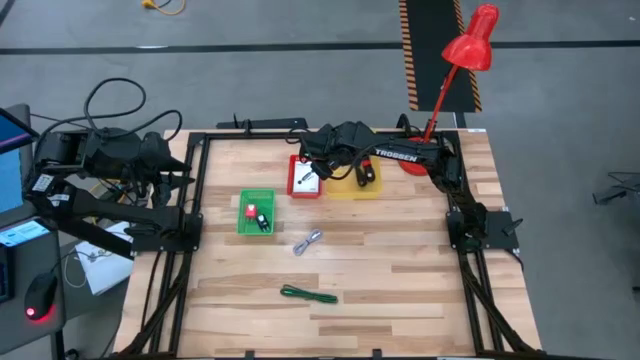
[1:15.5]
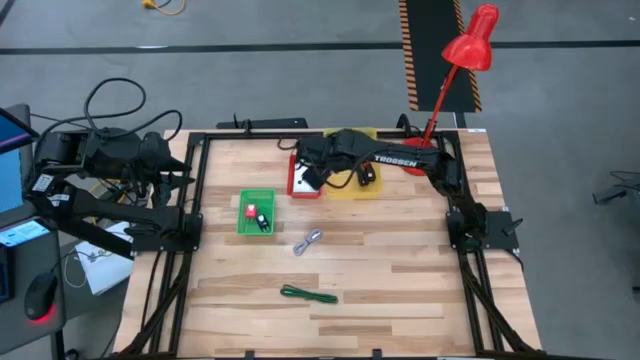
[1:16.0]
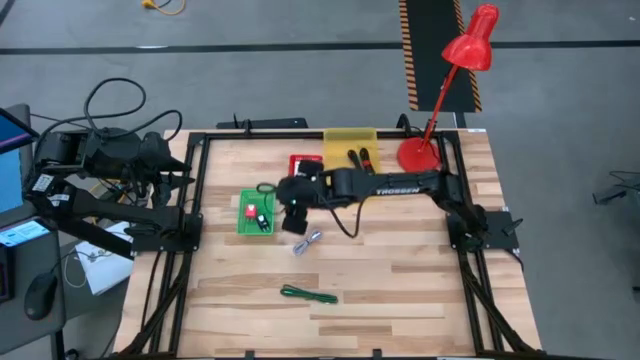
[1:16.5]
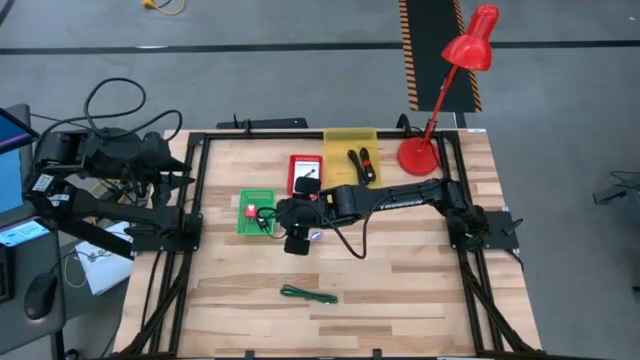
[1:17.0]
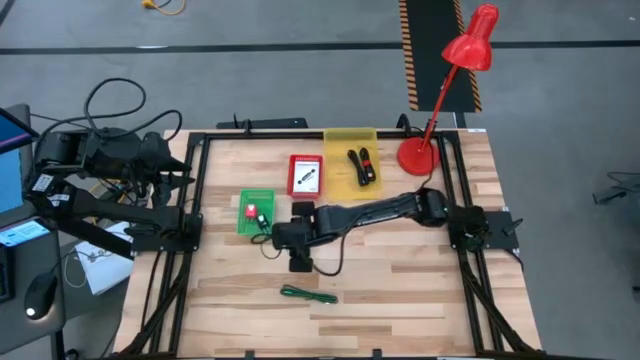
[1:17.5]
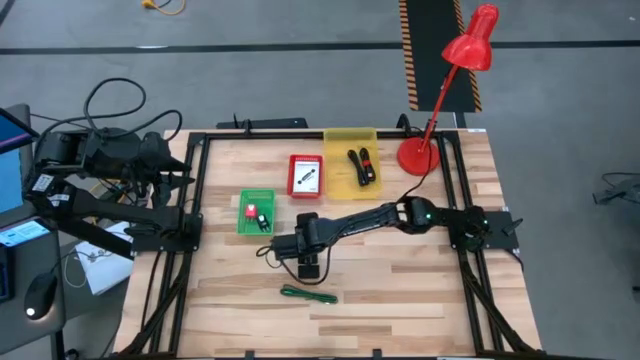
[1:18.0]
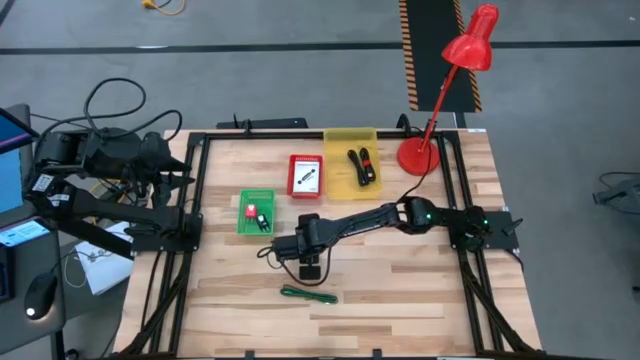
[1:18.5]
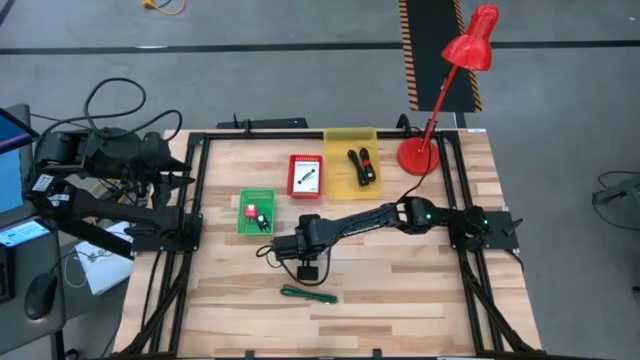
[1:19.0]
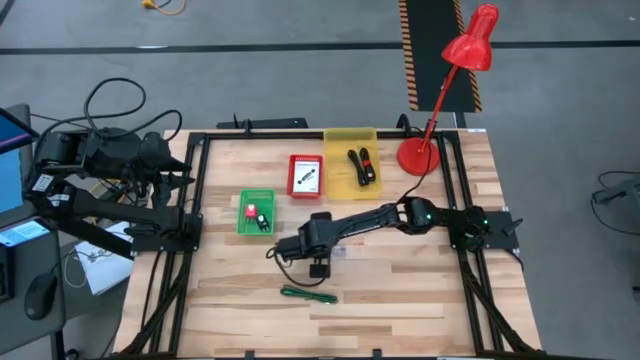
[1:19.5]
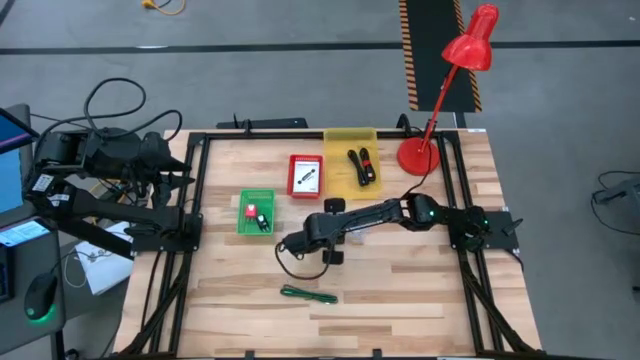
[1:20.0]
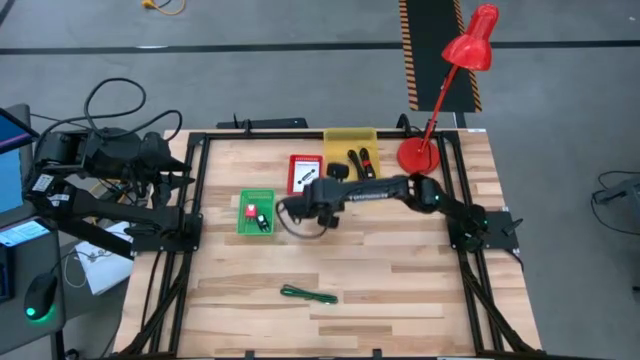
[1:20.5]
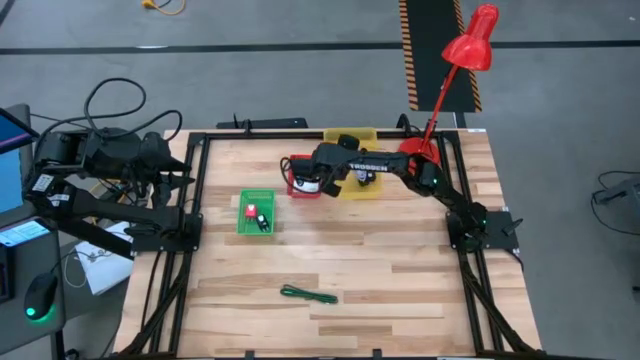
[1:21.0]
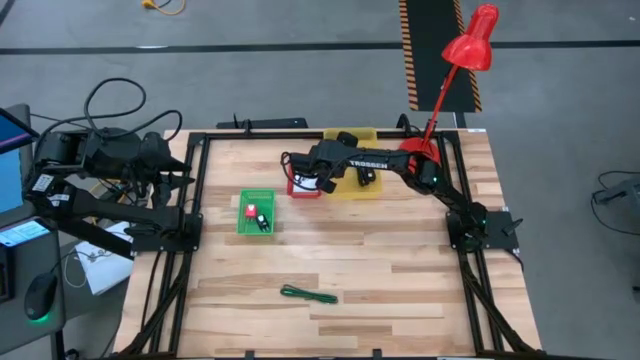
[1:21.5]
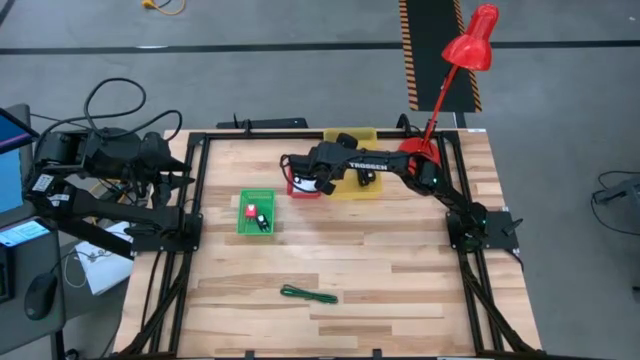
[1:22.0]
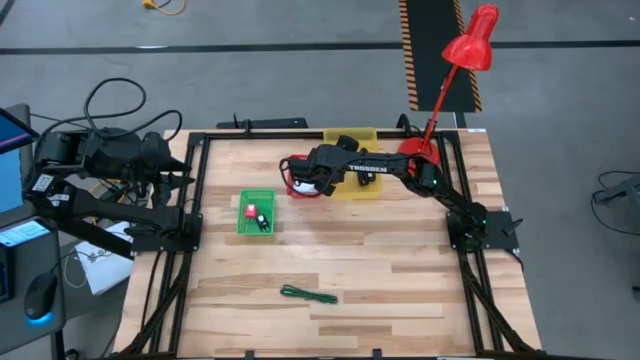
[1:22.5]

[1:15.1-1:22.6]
Task: Pick and place items into bin
Put the white charger cable into the yellow bin

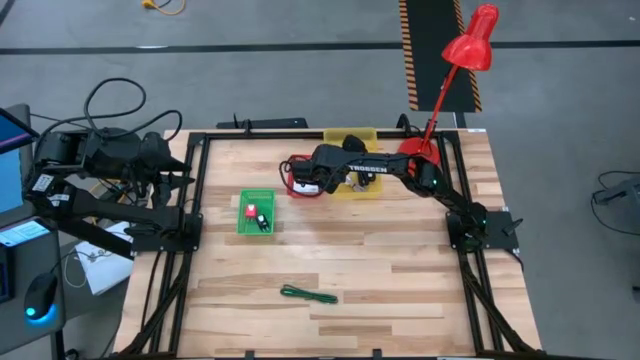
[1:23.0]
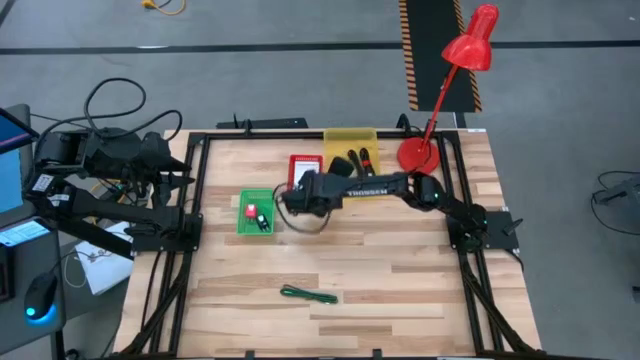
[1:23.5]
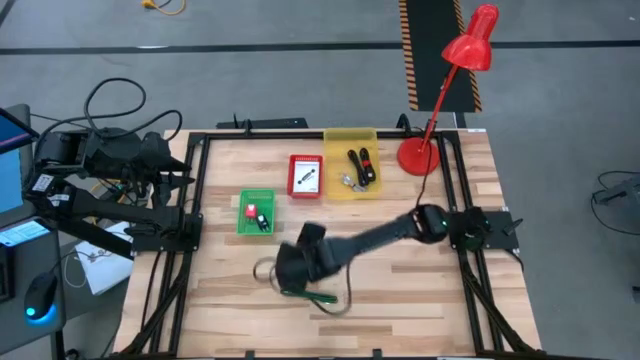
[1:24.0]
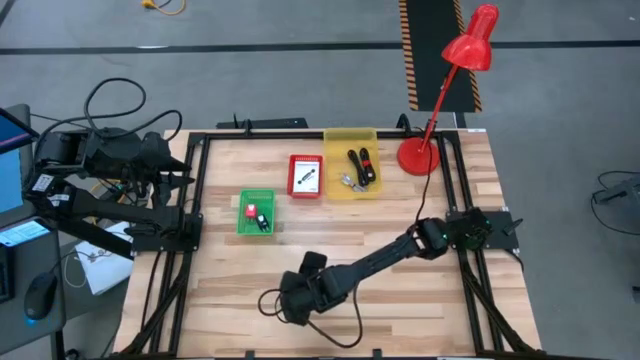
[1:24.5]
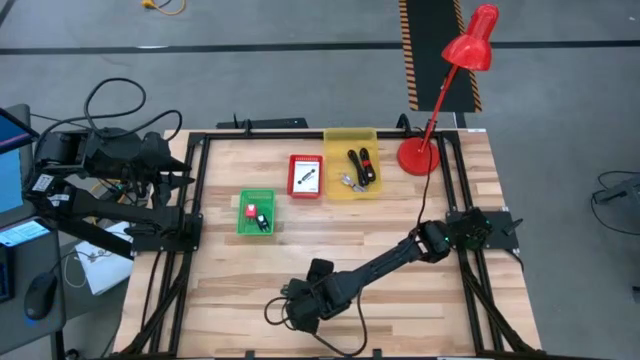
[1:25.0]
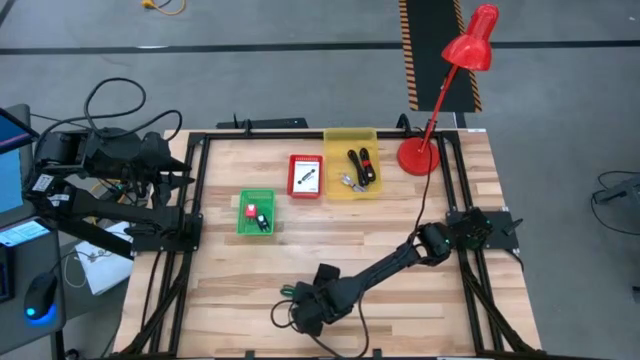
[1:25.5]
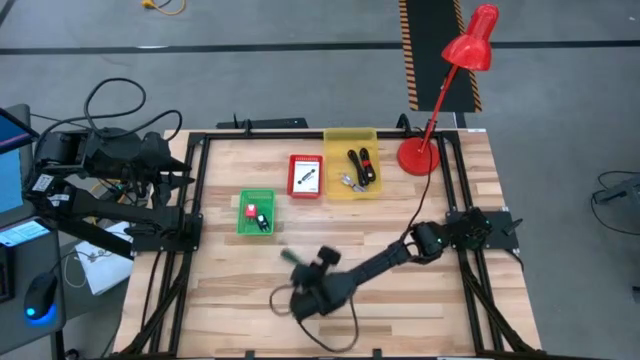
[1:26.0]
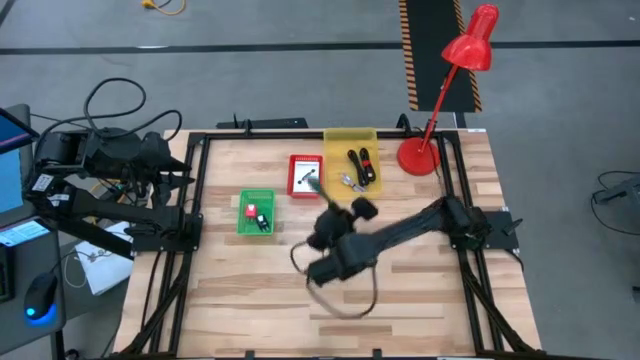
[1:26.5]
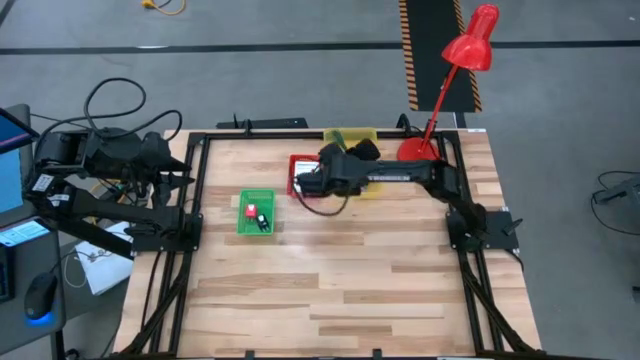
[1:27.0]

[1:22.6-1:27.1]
Put the green charger cable into the yellow bin

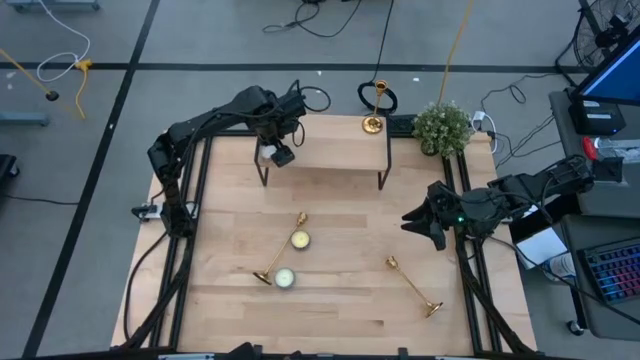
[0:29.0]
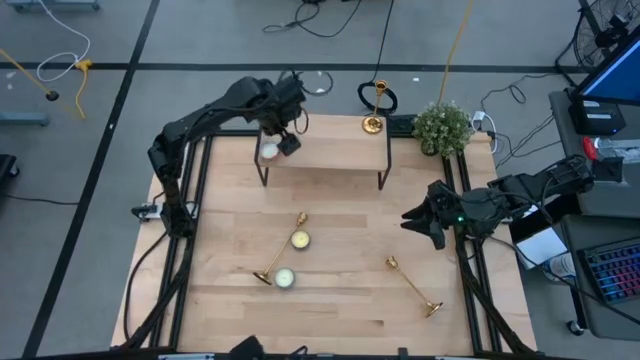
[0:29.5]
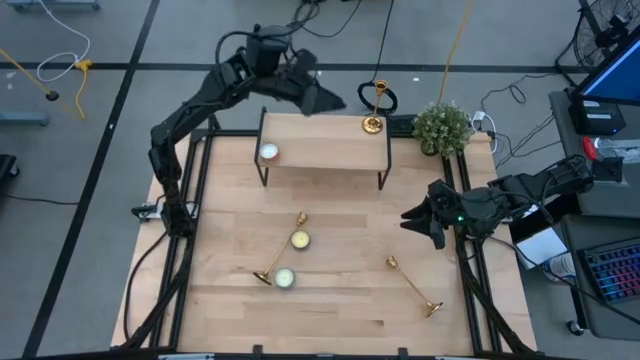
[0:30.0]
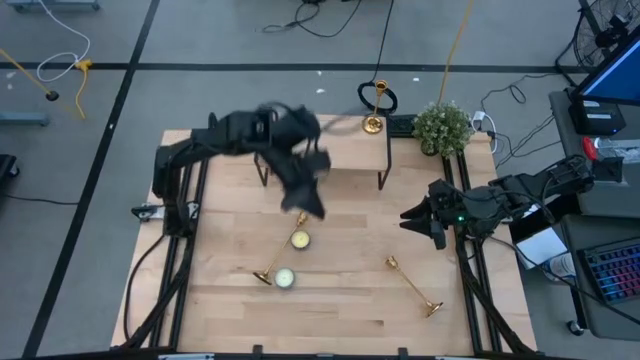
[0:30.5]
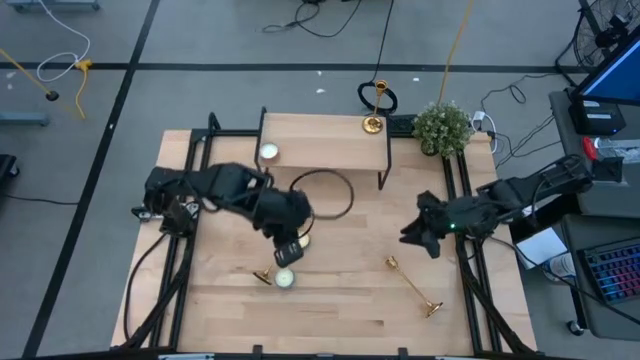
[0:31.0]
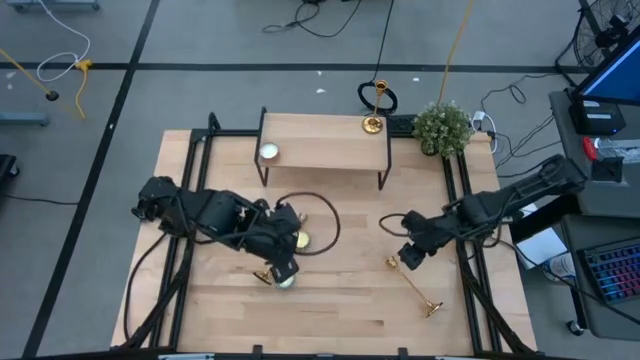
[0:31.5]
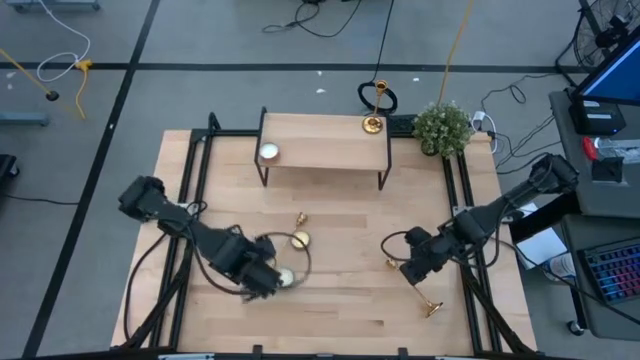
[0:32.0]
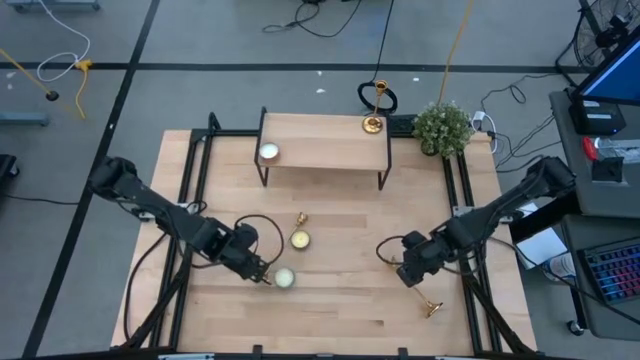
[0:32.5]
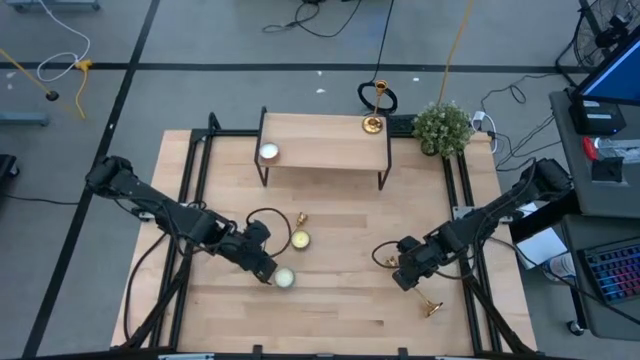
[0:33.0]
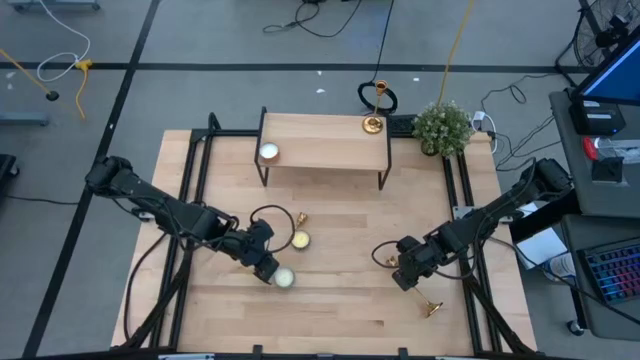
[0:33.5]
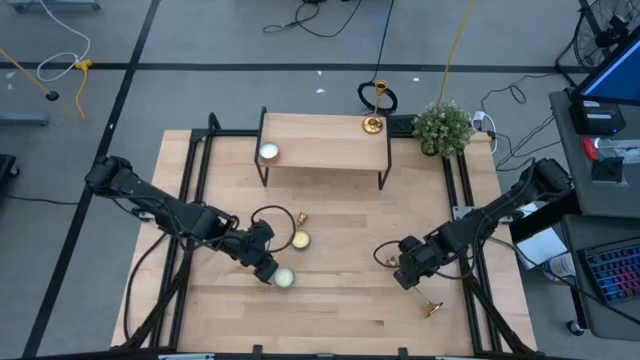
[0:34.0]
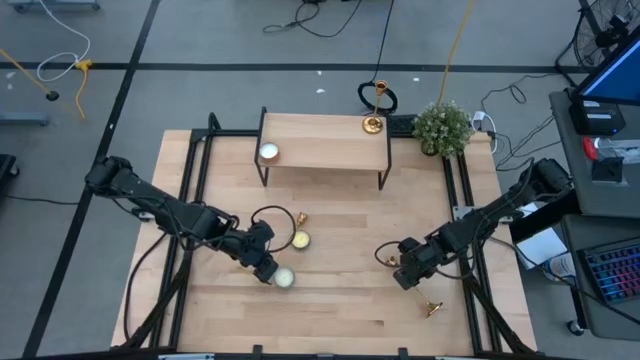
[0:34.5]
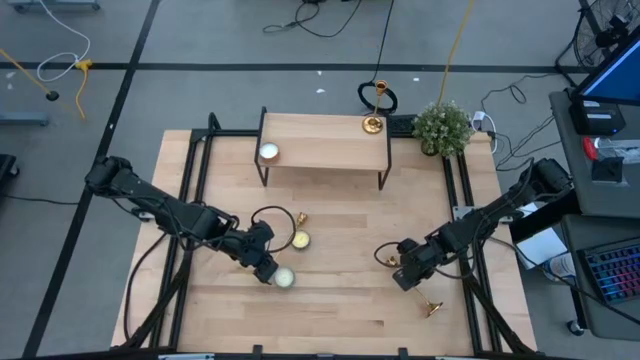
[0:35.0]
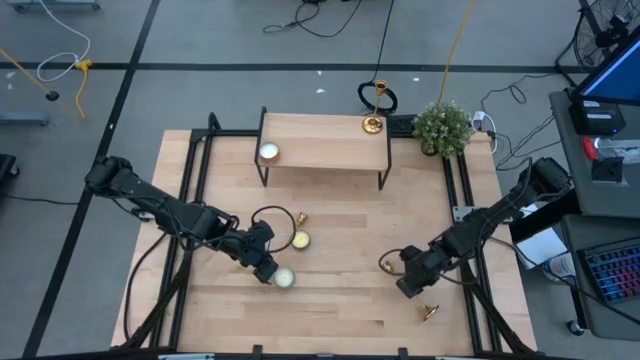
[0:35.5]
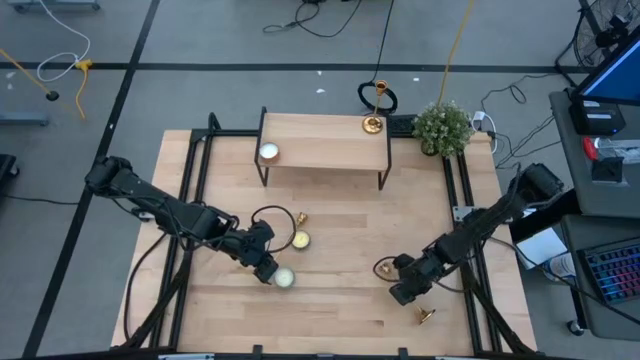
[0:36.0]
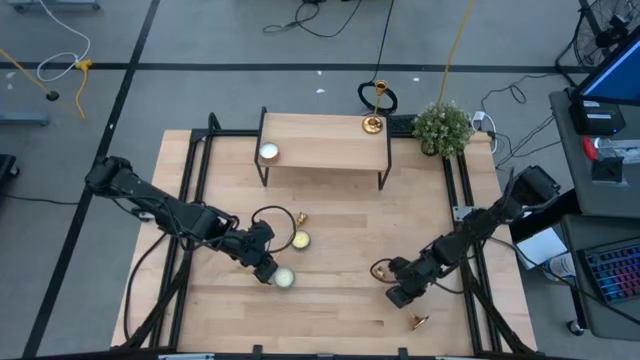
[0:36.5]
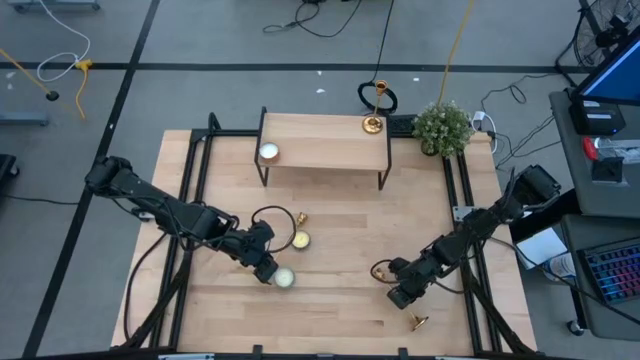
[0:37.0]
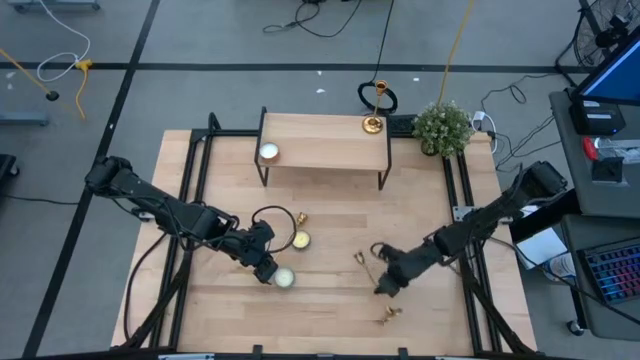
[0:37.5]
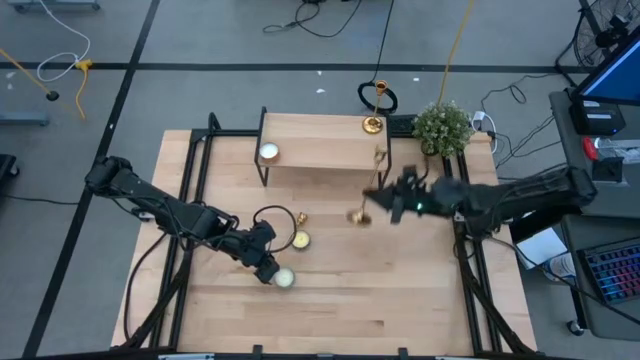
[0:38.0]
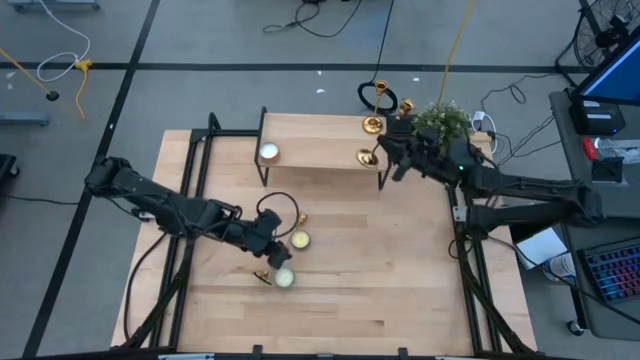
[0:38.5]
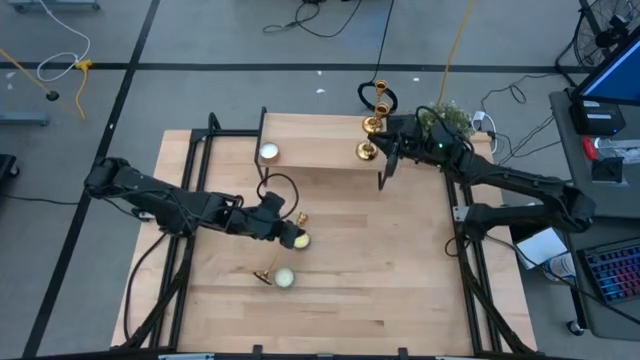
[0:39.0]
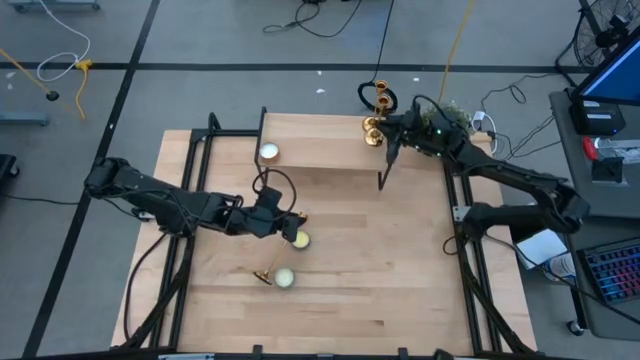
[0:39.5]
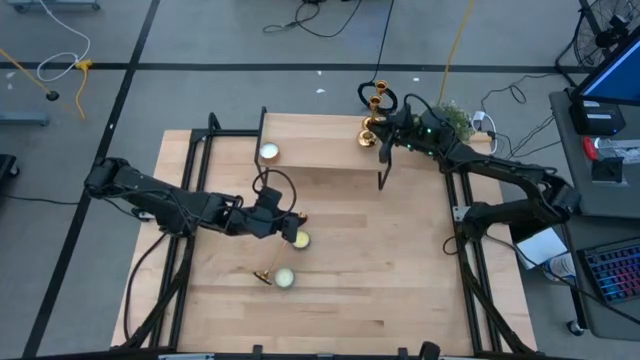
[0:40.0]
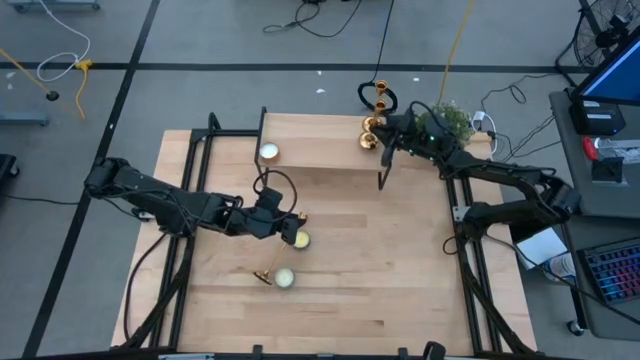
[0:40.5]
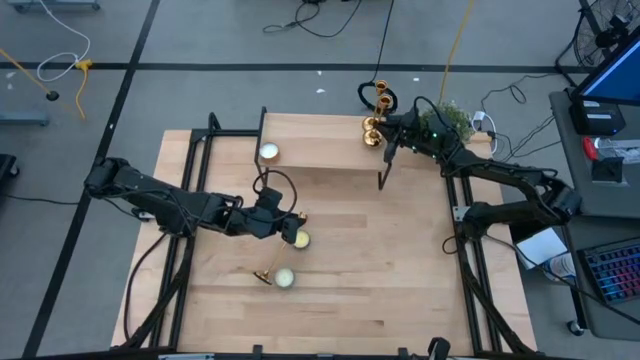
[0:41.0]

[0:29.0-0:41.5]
Task: Pick & Place candle stick holders
Put the right candle holder aligned with the other candle holder on the shelf
